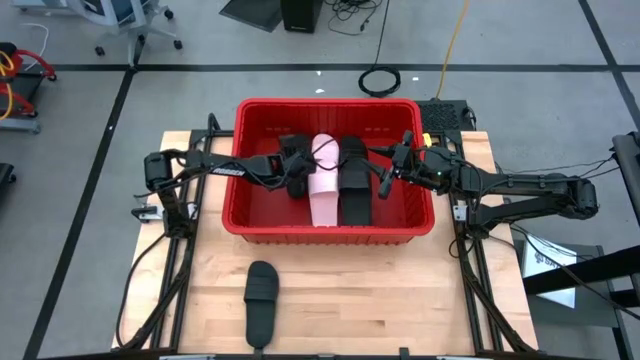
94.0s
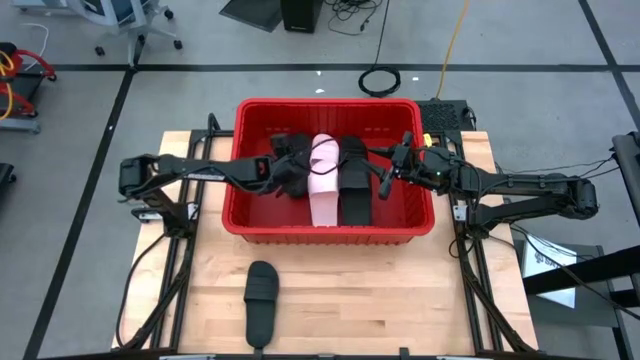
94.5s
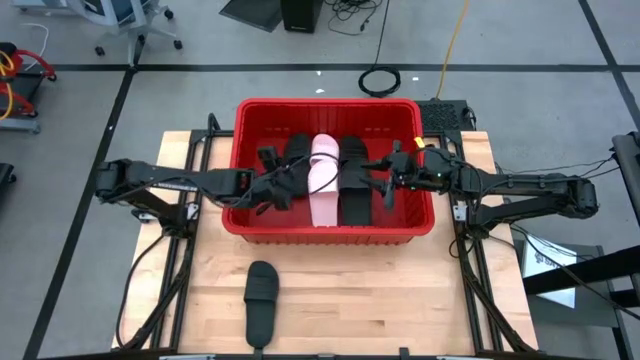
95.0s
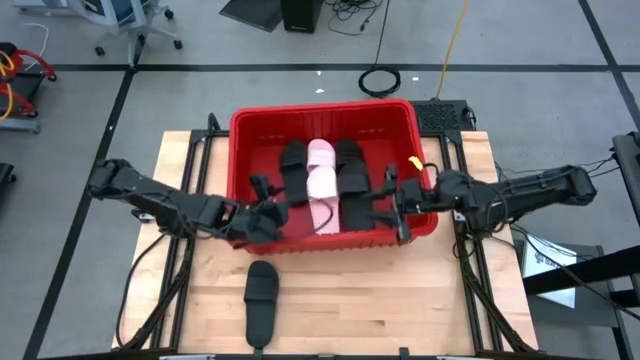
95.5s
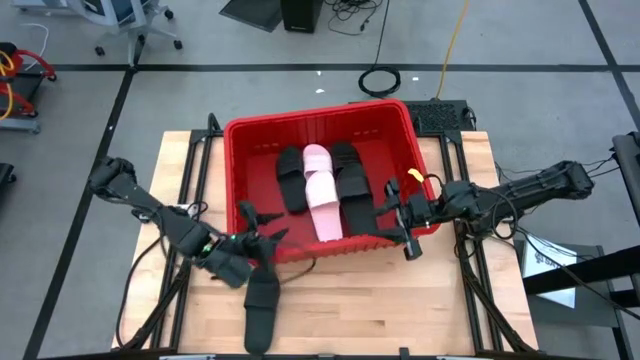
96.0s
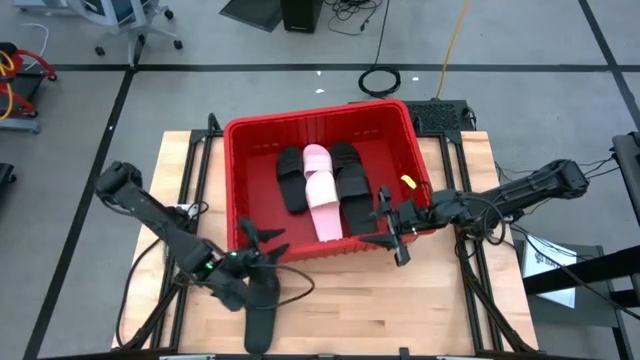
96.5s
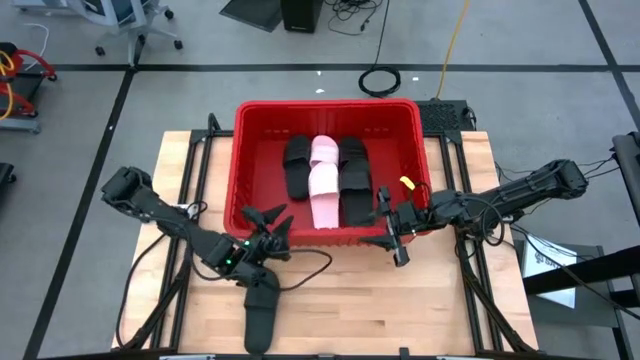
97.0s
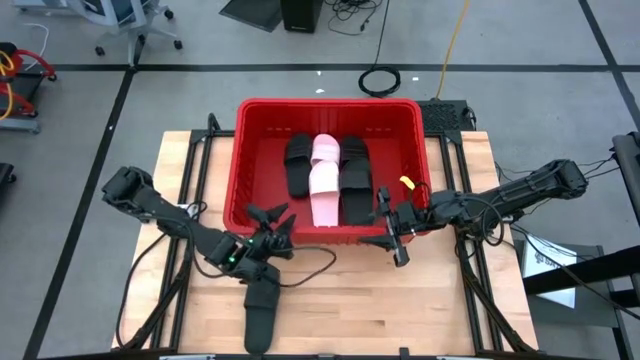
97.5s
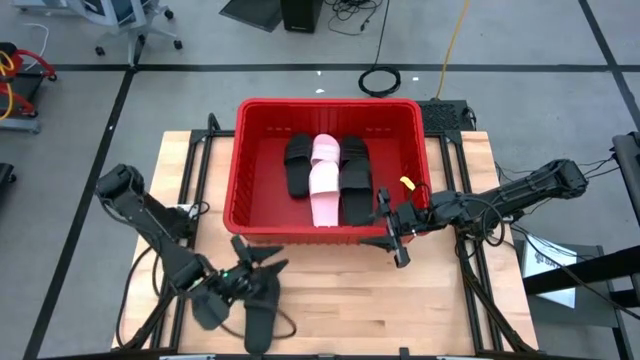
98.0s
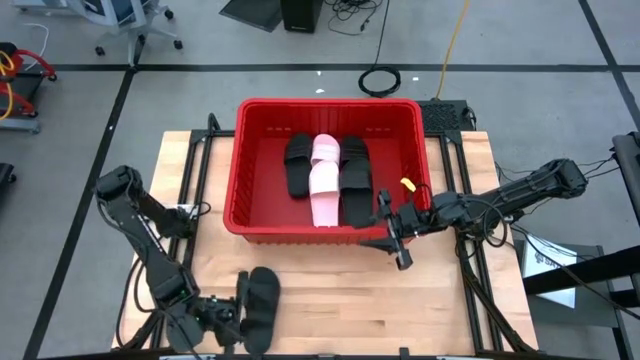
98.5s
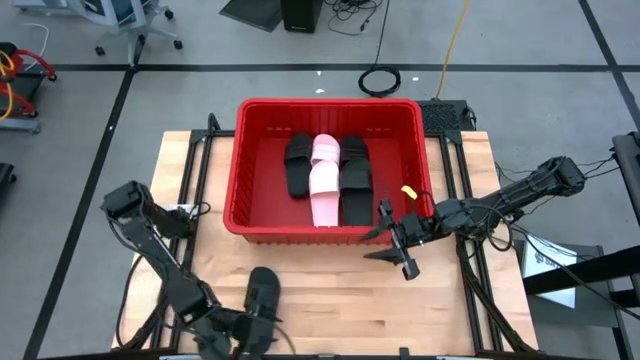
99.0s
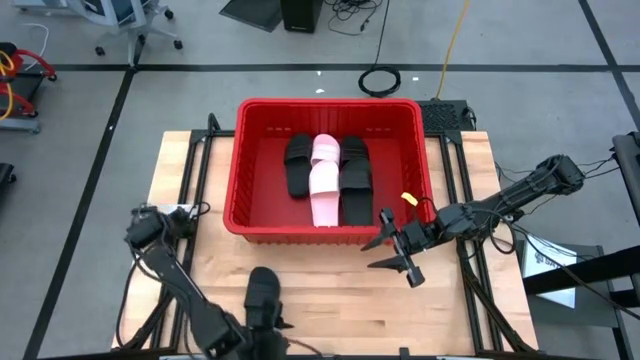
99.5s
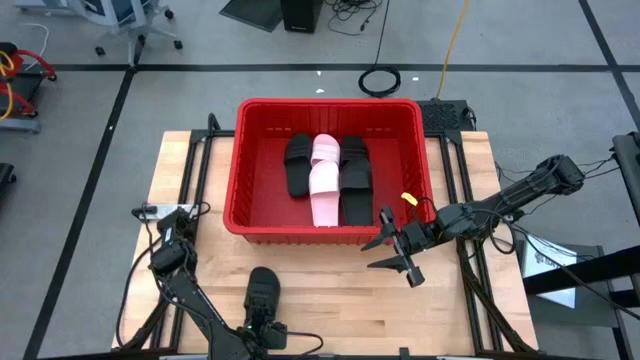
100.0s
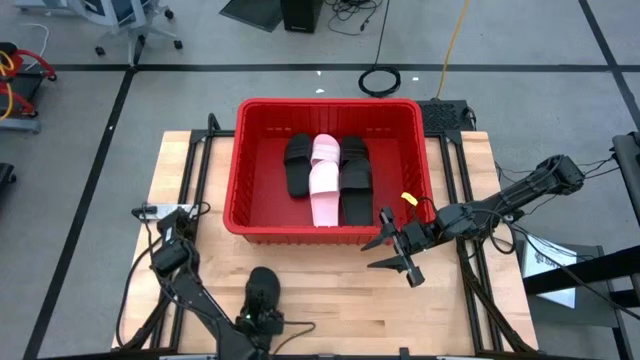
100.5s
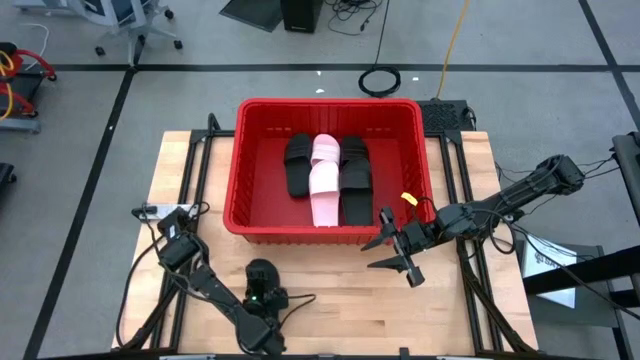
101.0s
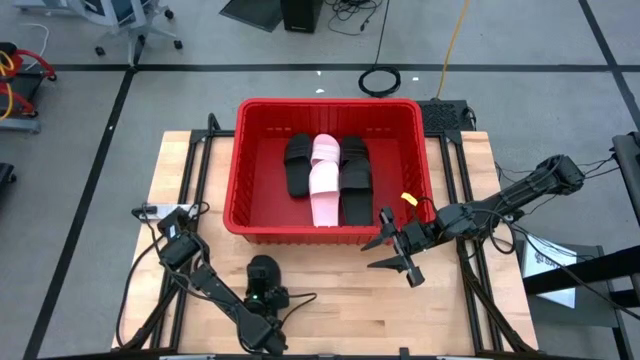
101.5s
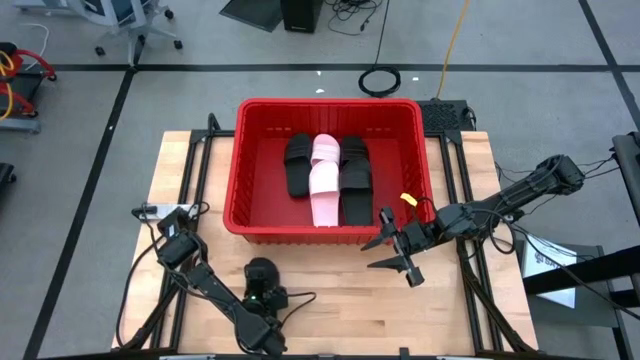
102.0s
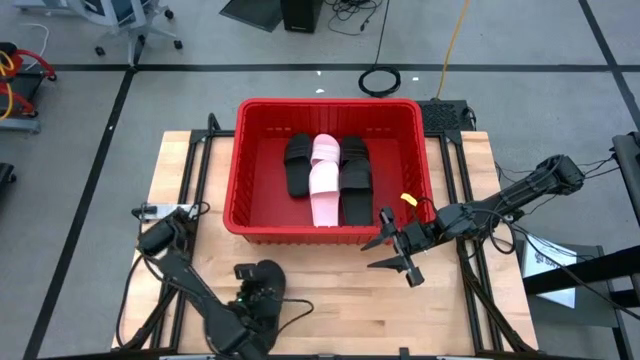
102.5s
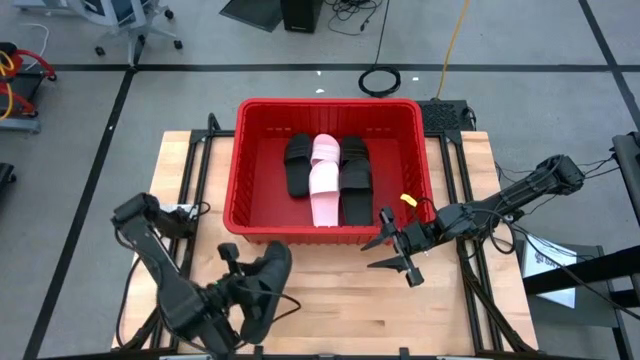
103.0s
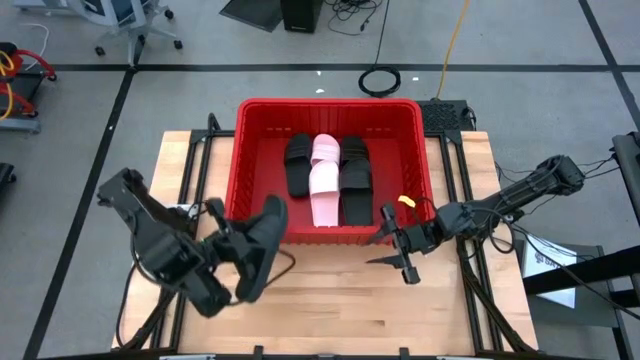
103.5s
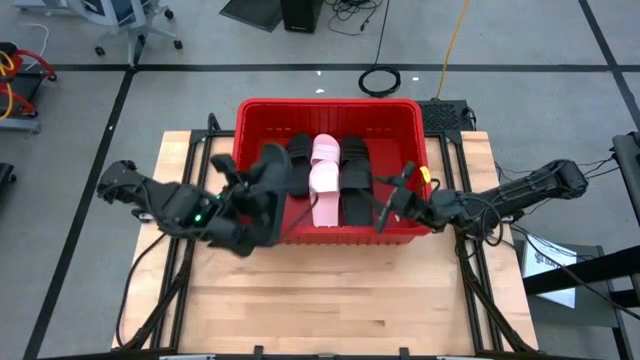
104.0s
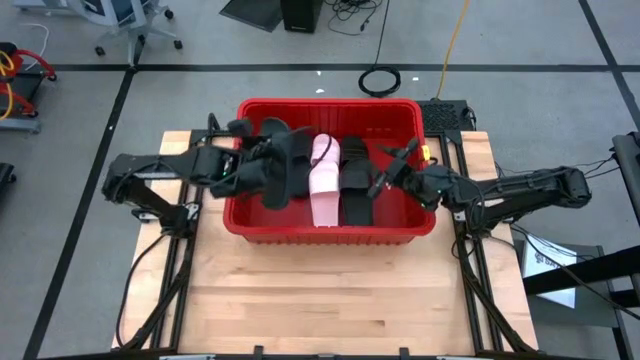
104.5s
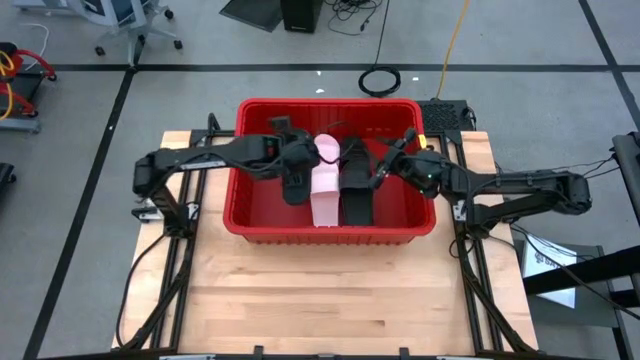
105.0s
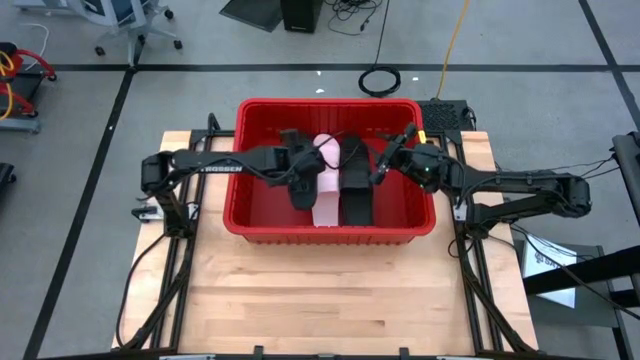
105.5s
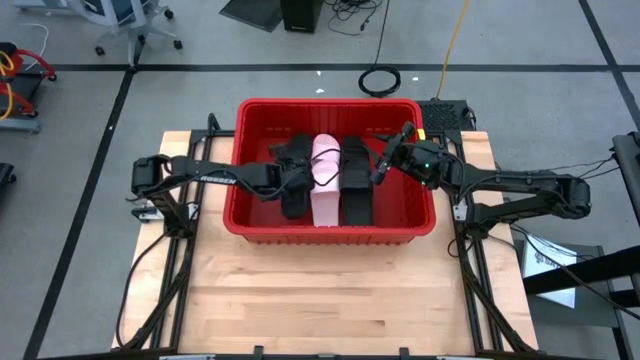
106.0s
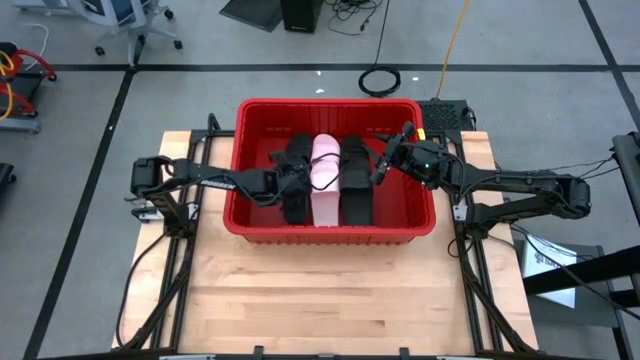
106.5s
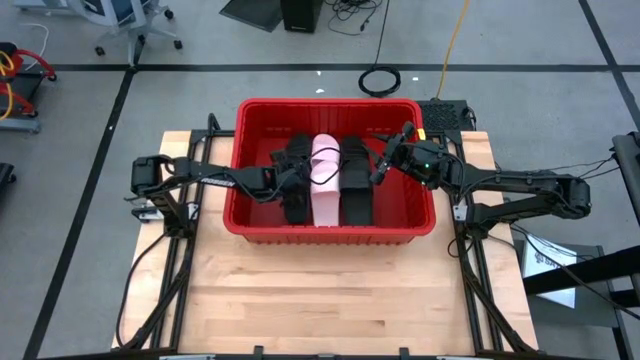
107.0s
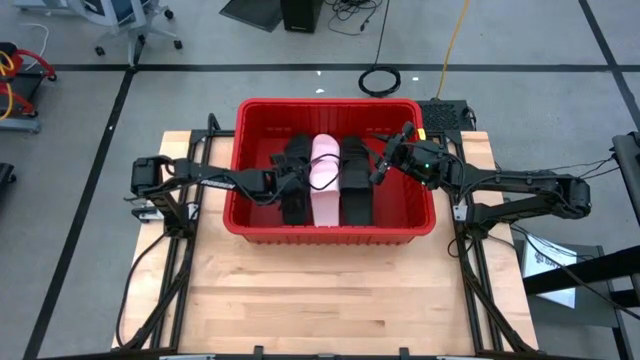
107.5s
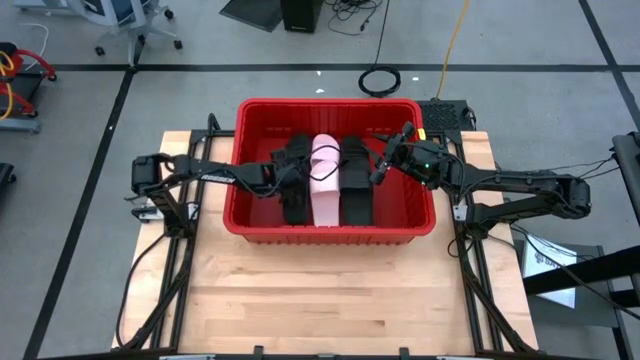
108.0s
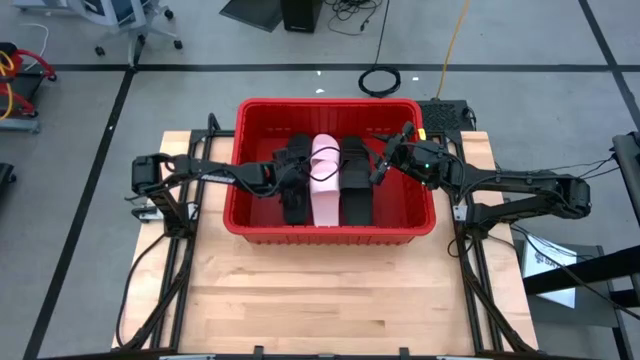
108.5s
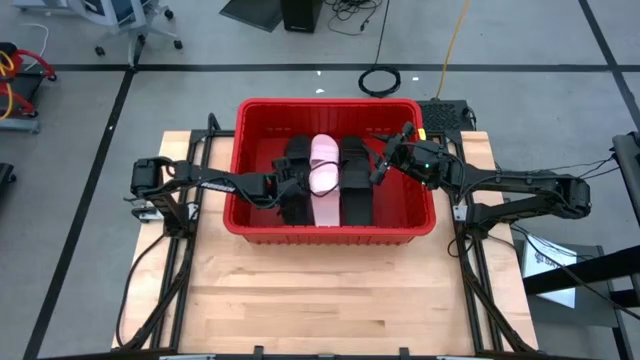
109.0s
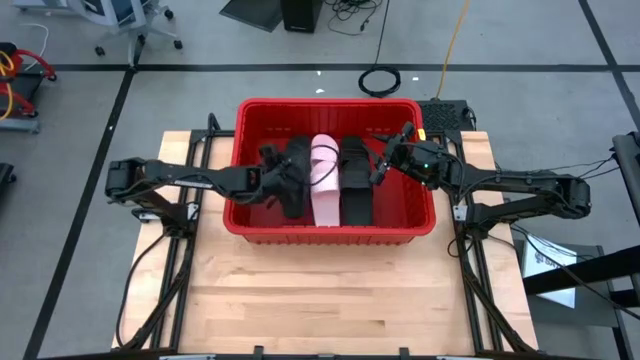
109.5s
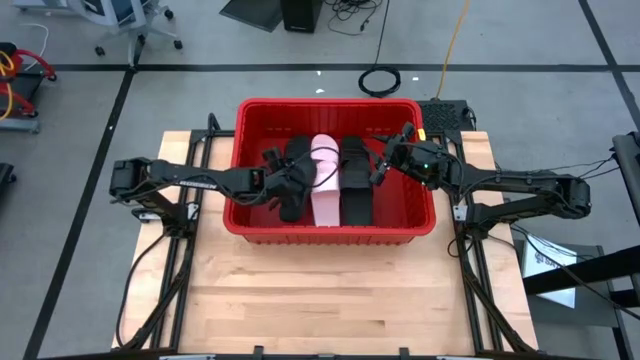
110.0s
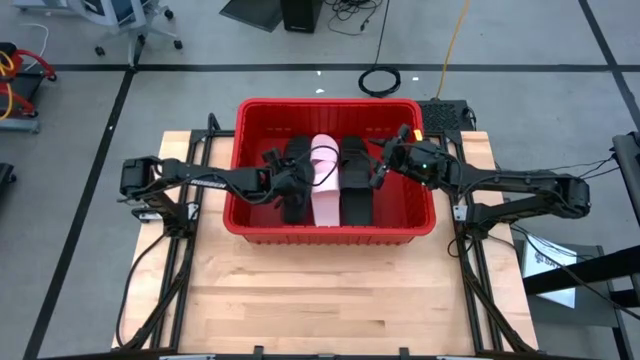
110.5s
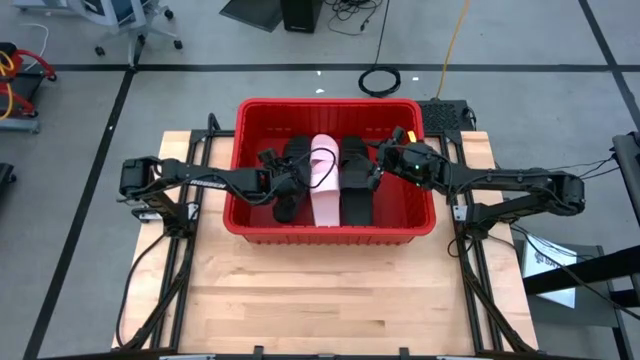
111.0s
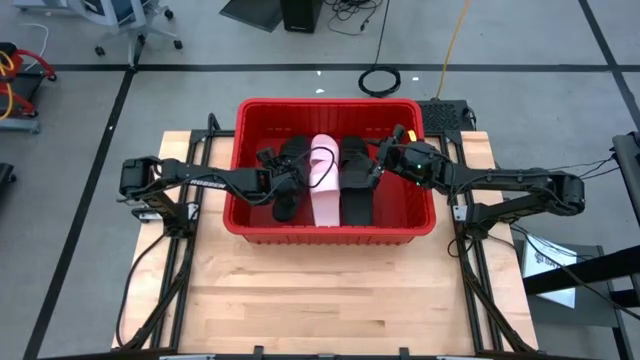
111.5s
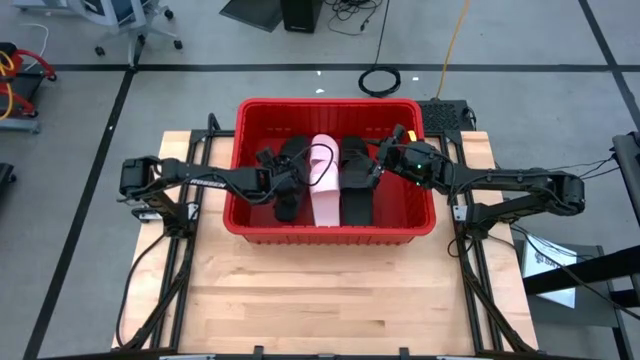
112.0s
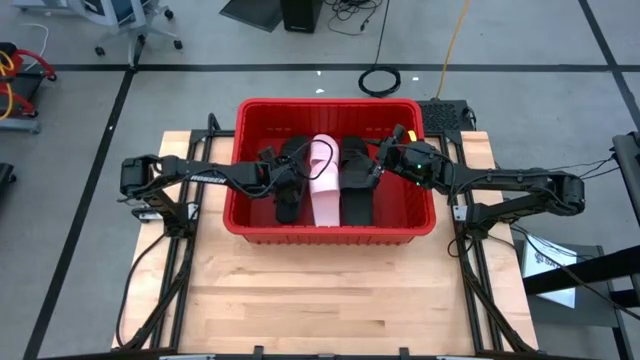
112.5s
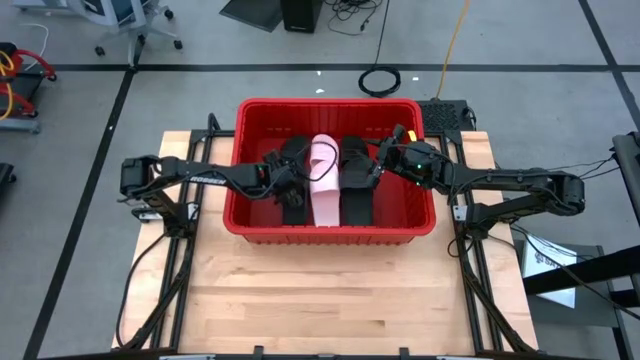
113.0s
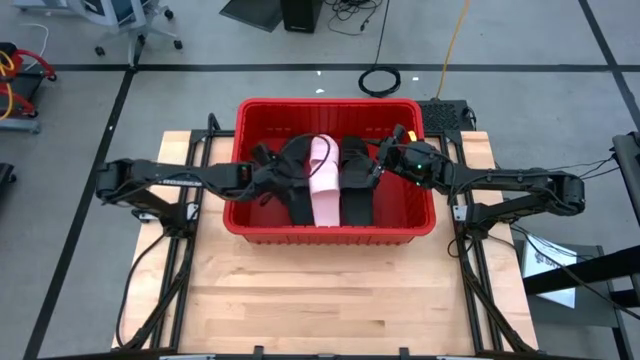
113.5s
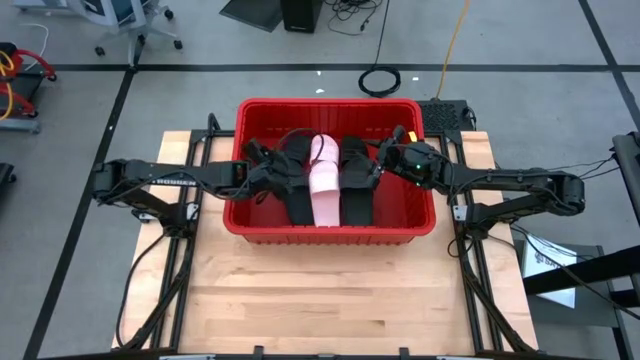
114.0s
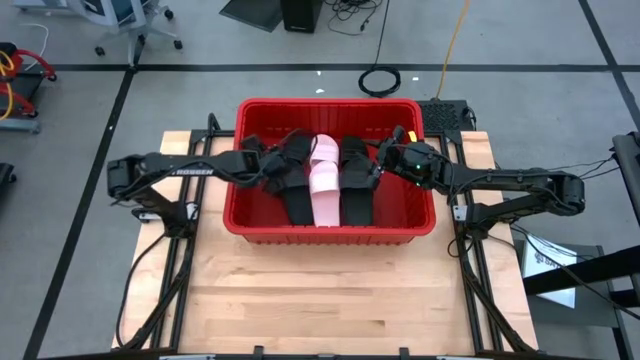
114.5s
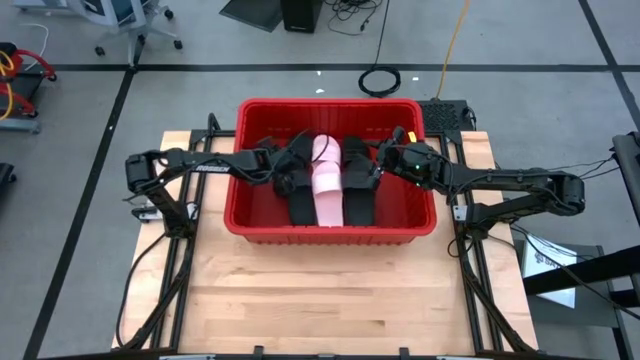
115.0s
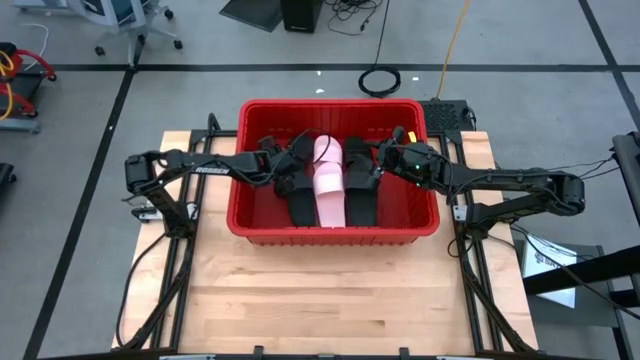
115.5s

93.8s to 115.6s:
Task: Pick and place slides into bin
Put the black slide into the red bin
